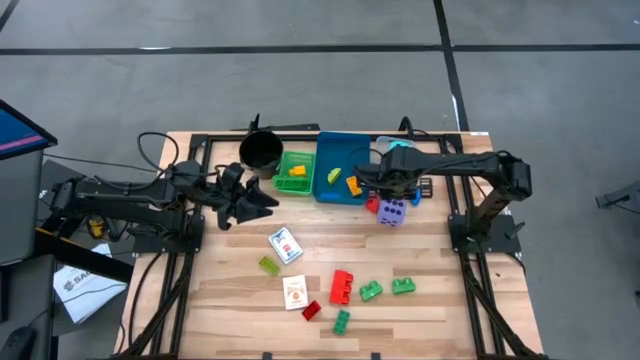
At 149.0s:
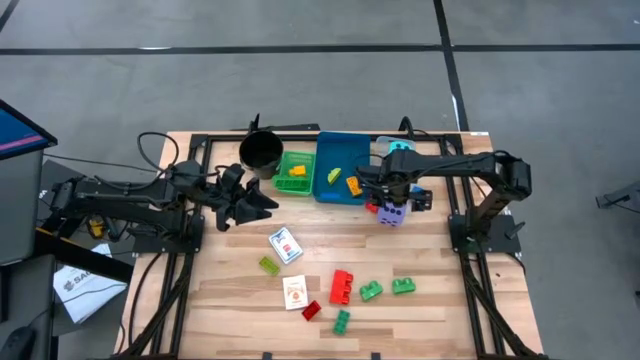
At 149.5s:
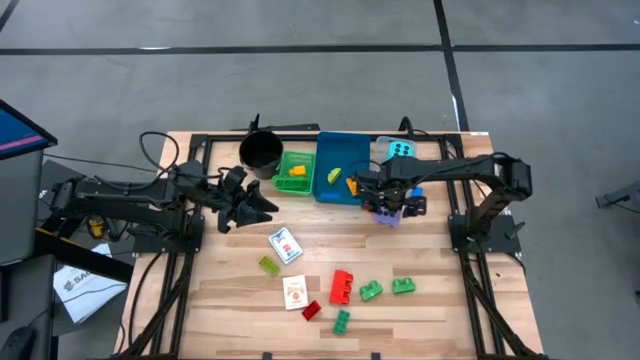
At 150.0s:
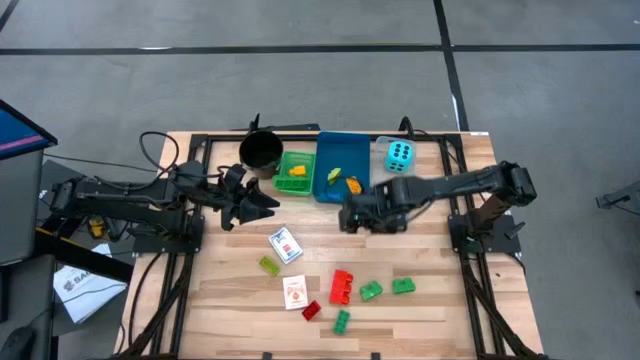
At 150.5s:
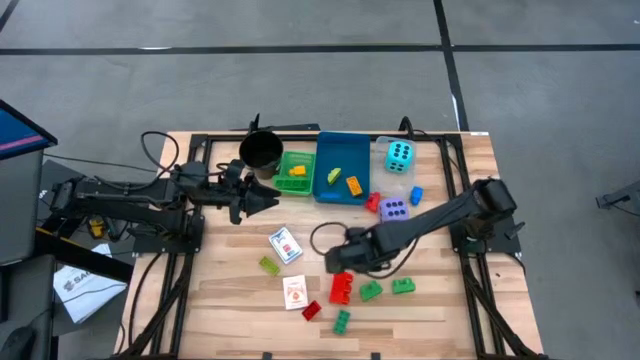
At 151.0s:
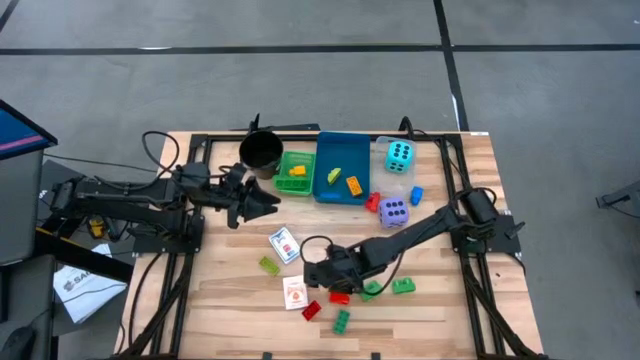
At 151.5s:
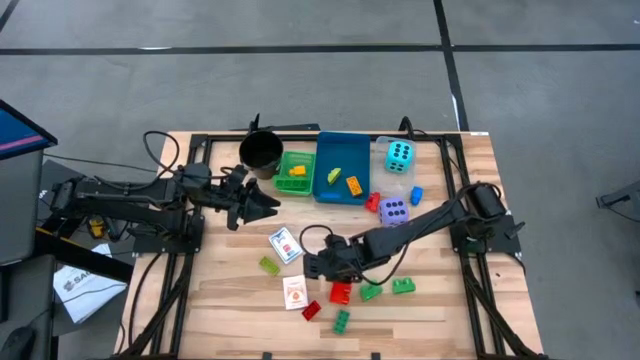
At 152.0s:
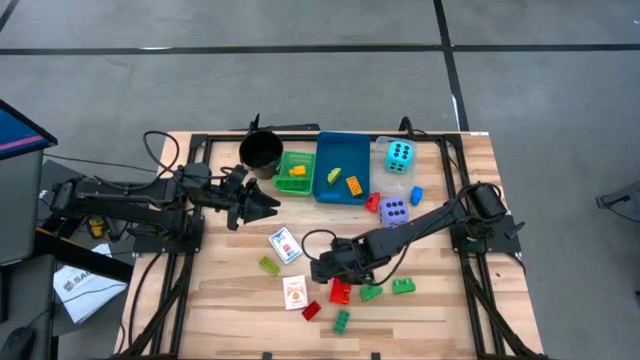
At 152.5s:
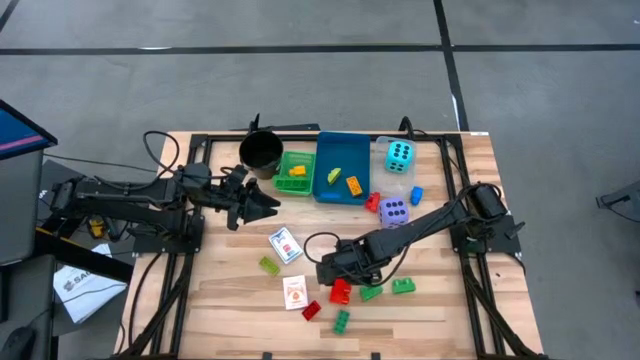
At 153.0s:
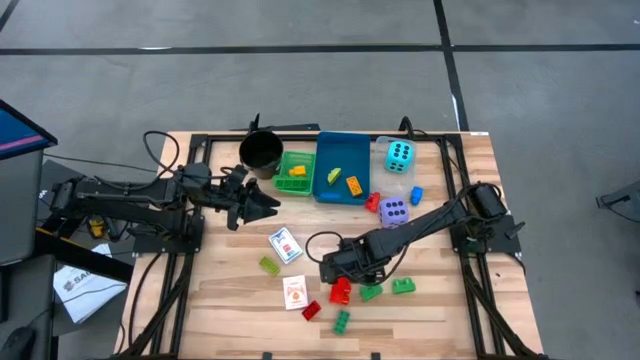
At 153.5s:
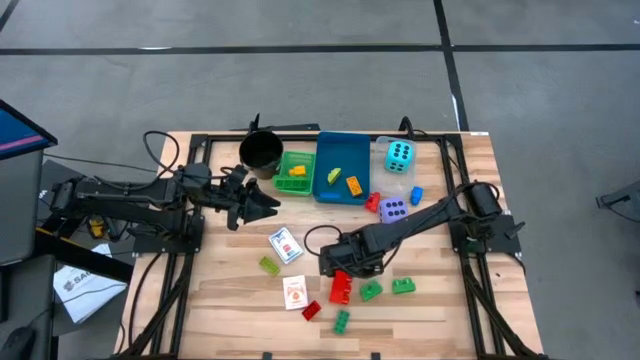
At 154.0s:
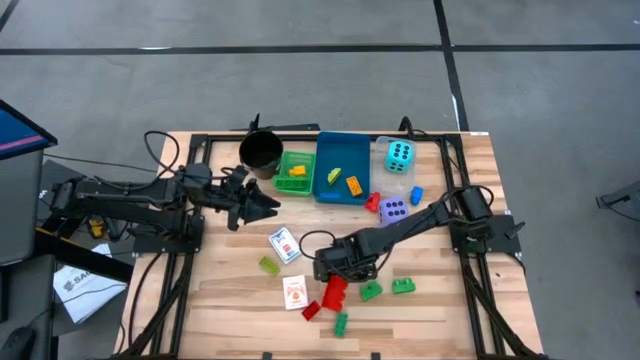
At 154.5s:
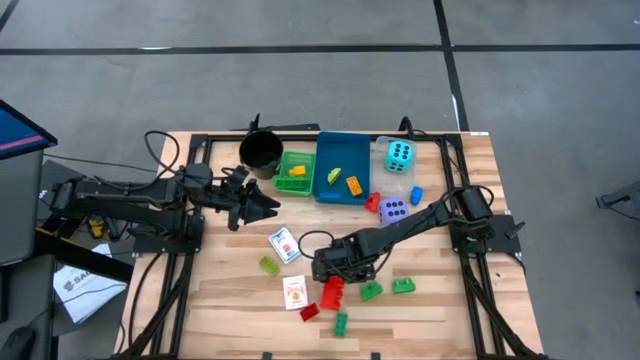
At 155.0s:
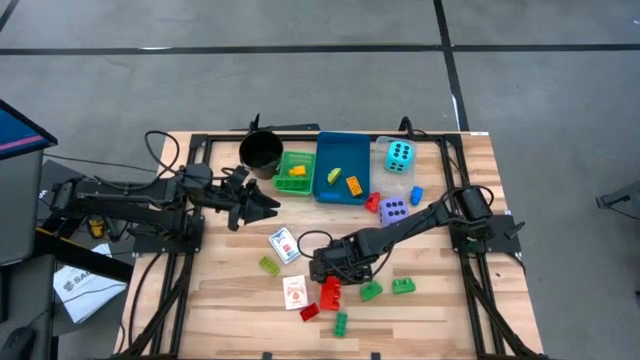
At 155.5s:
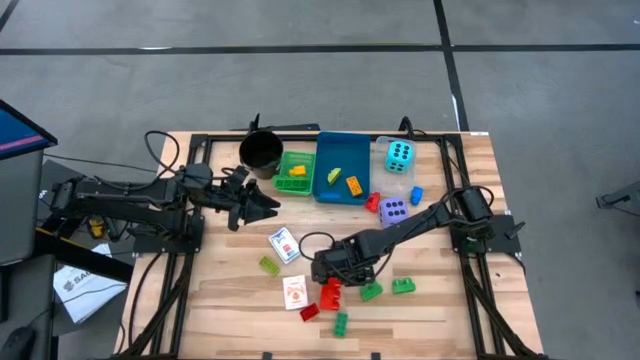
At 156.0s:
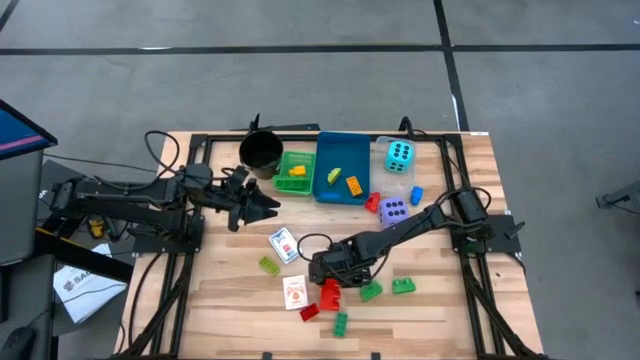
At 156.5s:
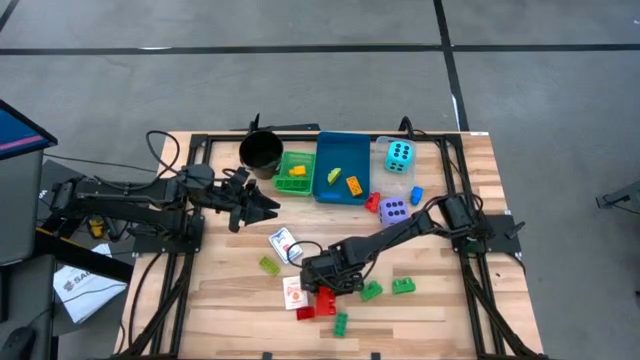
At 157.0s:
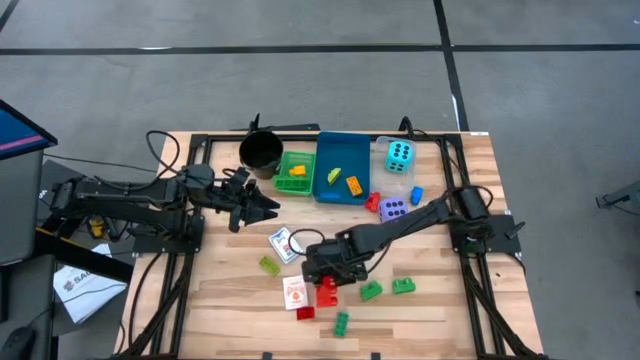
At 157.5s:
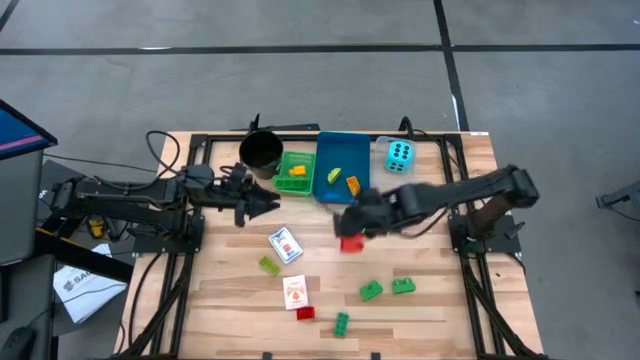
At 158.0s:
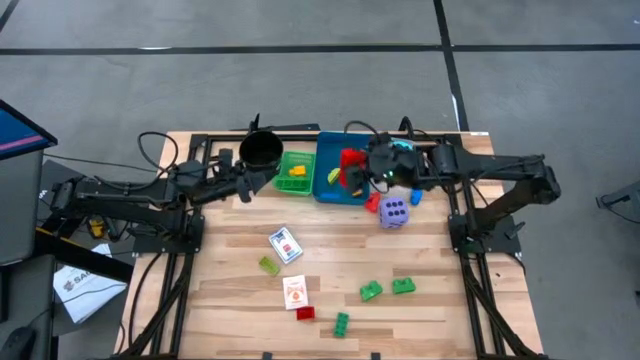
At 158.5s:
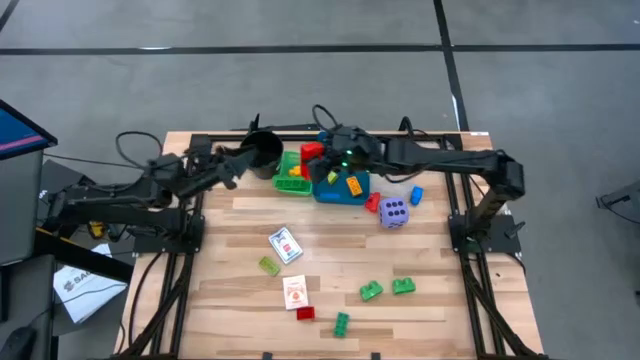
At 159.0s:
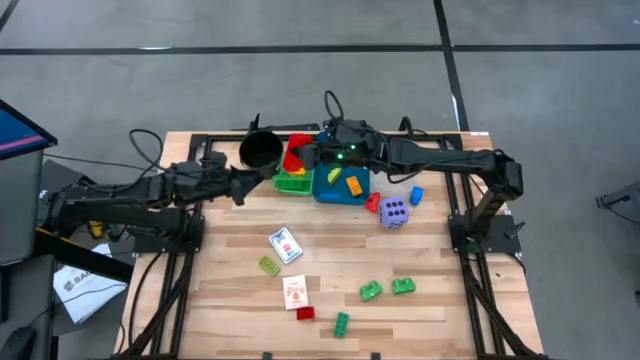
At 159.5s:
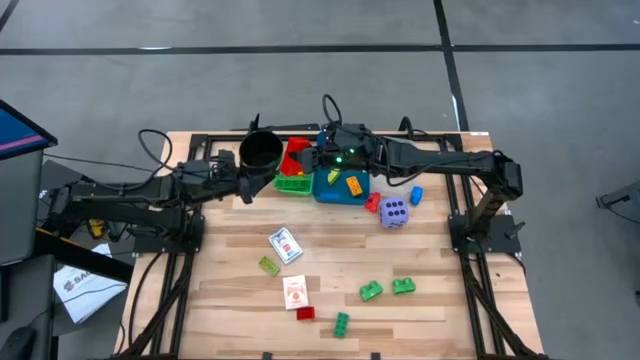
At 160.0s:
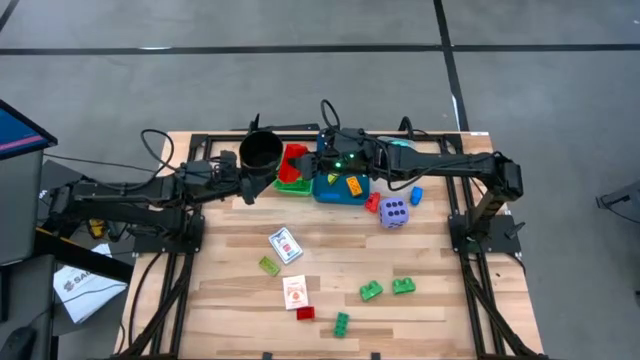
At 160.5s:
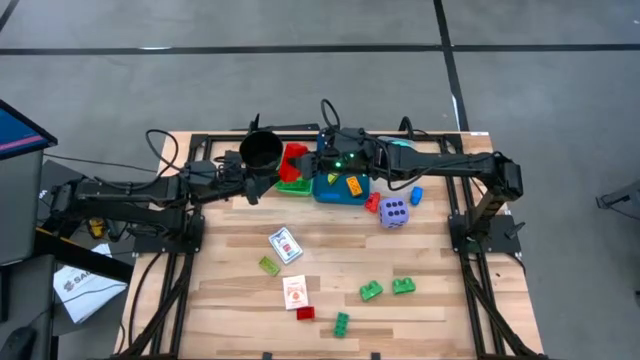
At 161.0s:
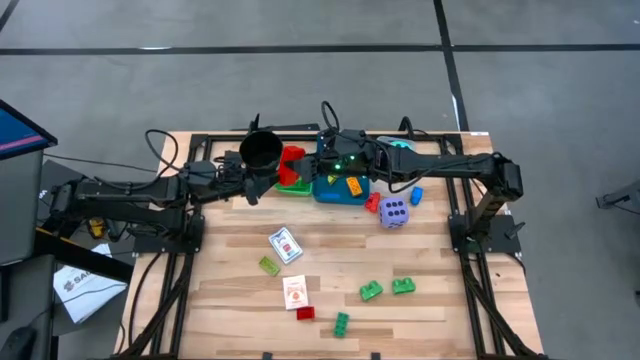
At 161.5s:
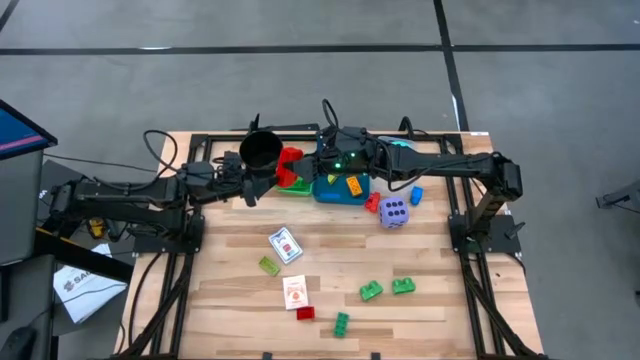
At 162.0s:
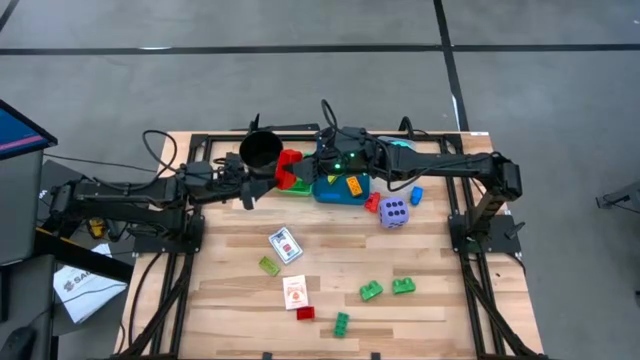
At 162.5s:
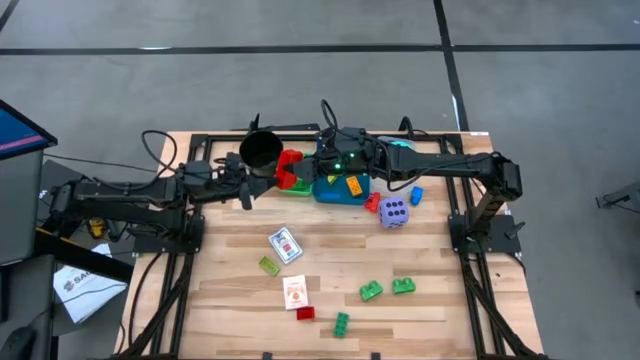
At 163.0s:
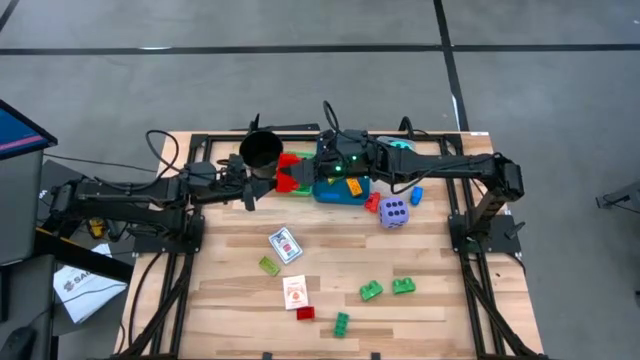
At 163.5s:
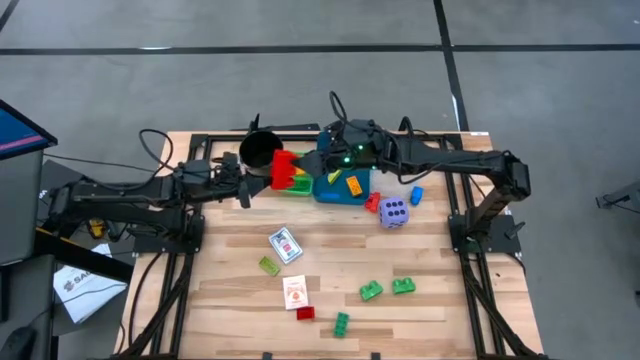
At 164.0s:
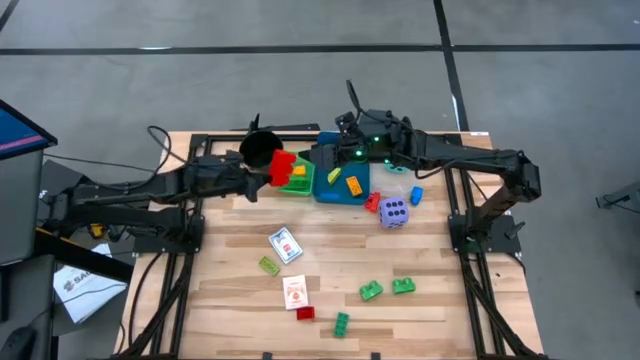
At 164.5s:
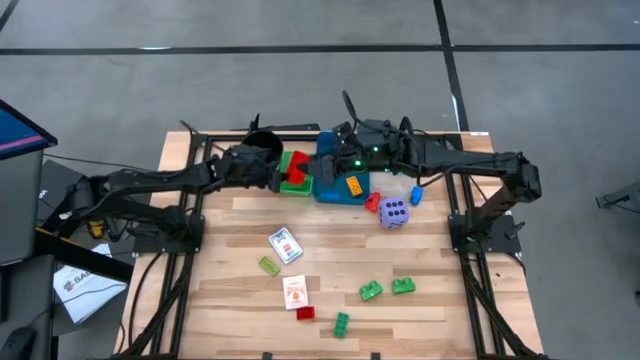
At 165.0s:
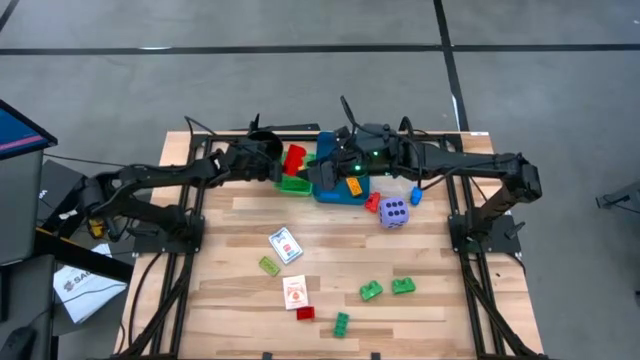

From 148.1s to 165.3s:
Task: Pick & Place Toys
Put the large stud red game piece into the green bin
